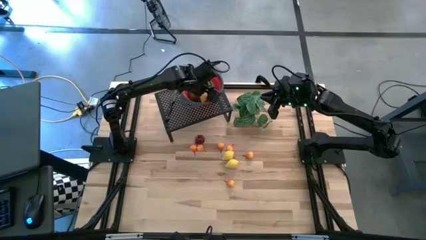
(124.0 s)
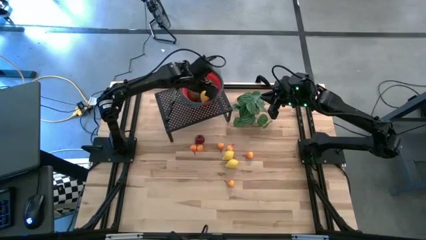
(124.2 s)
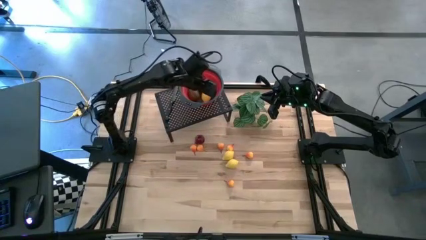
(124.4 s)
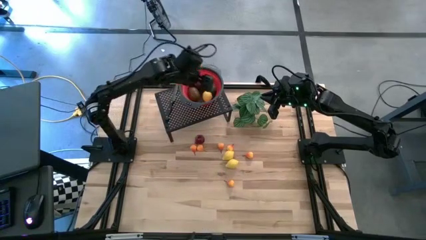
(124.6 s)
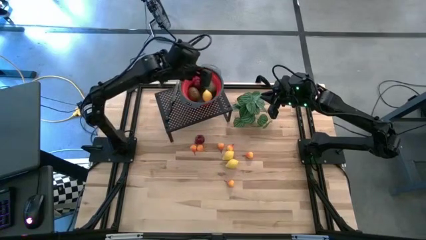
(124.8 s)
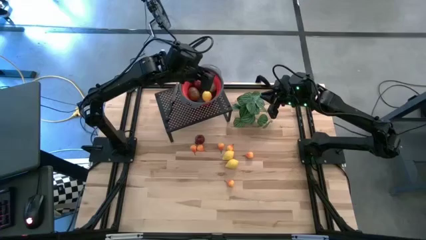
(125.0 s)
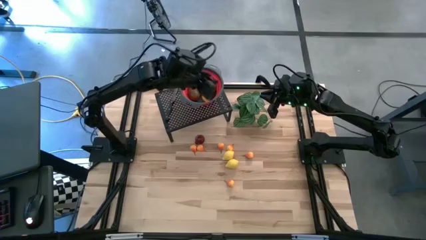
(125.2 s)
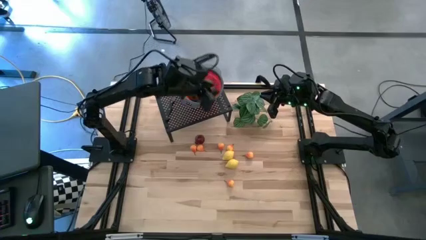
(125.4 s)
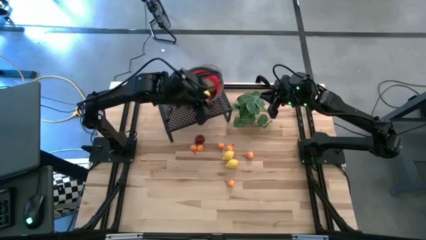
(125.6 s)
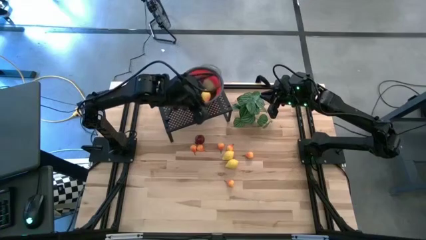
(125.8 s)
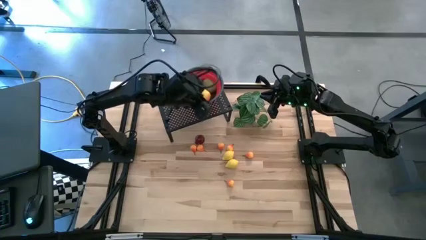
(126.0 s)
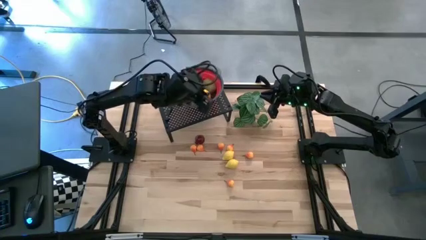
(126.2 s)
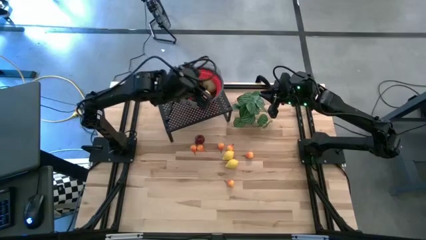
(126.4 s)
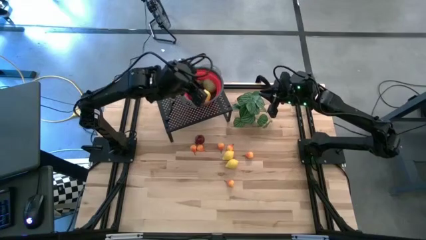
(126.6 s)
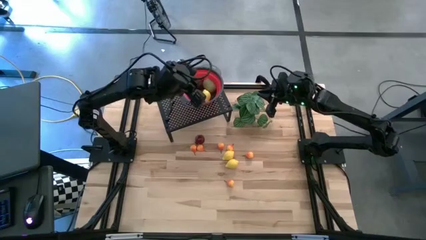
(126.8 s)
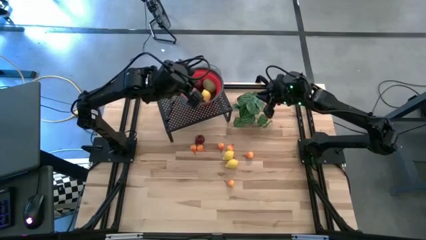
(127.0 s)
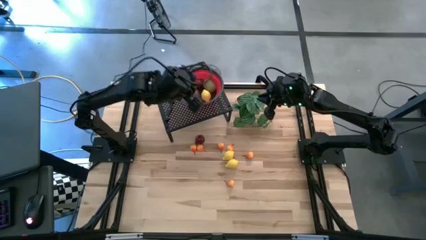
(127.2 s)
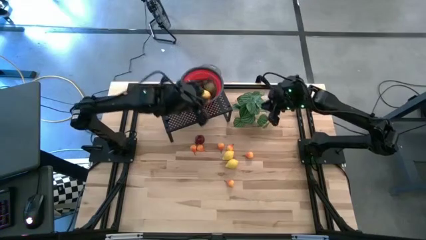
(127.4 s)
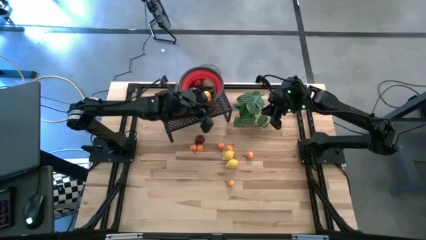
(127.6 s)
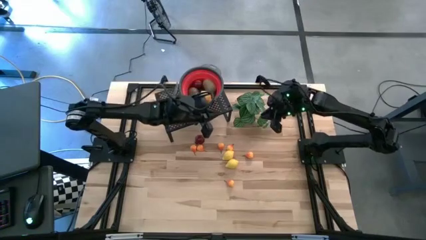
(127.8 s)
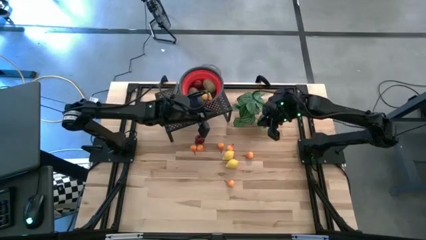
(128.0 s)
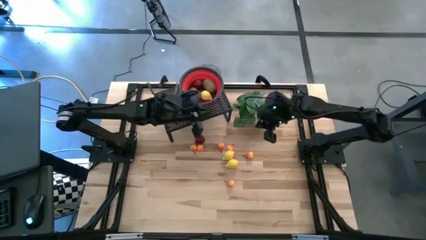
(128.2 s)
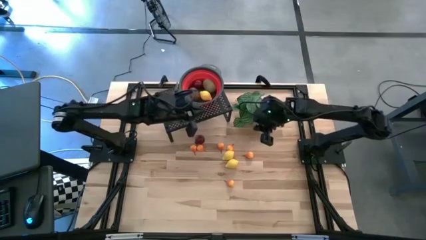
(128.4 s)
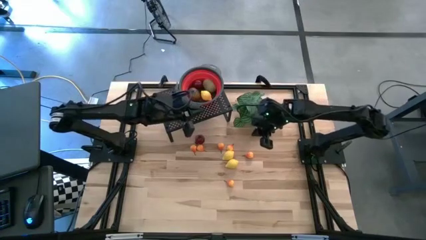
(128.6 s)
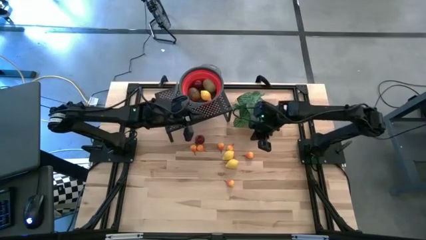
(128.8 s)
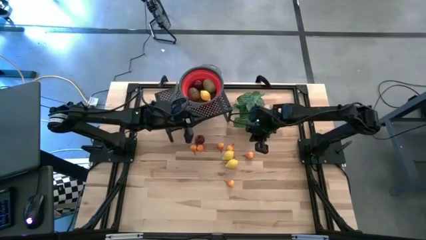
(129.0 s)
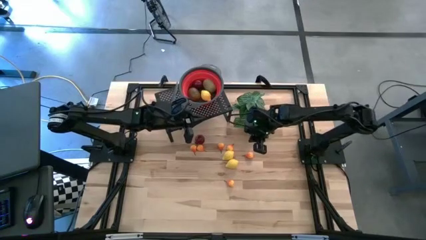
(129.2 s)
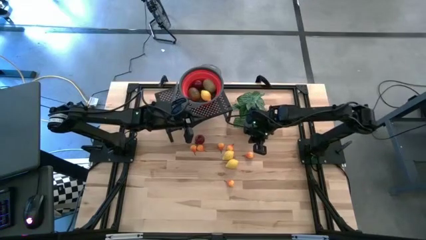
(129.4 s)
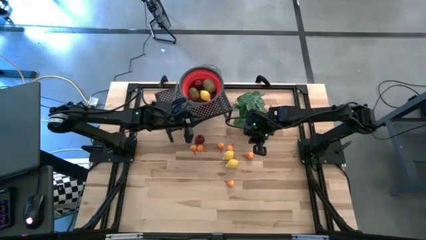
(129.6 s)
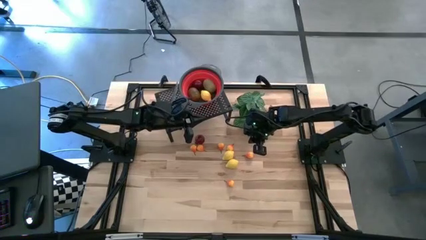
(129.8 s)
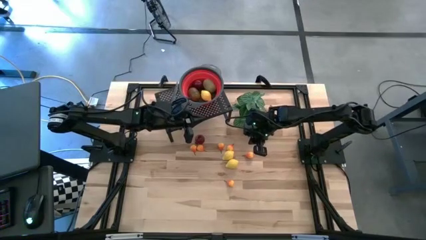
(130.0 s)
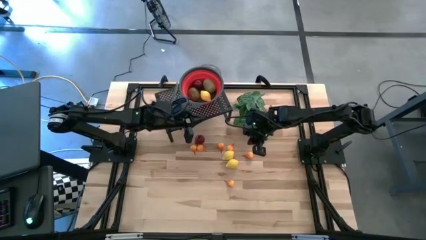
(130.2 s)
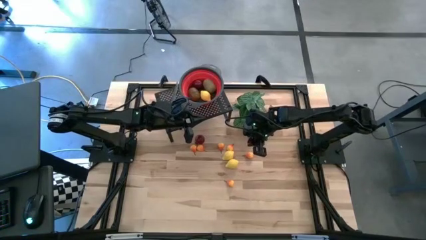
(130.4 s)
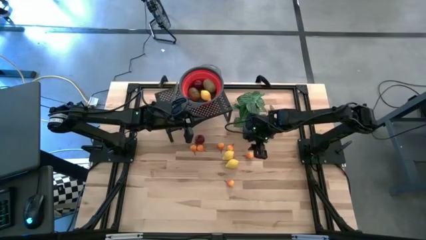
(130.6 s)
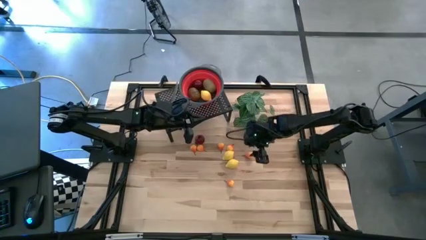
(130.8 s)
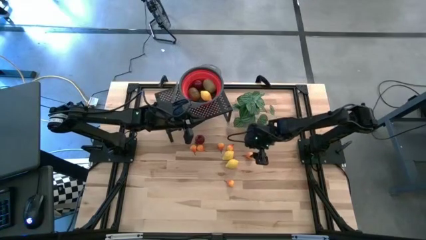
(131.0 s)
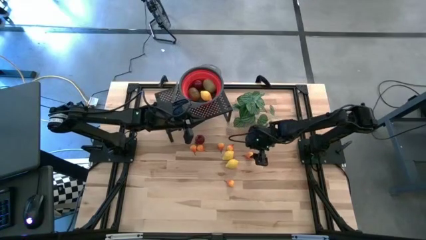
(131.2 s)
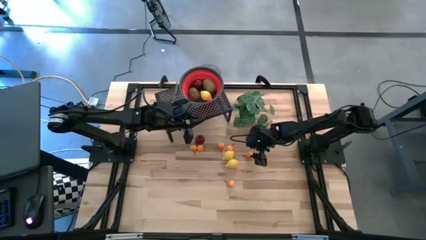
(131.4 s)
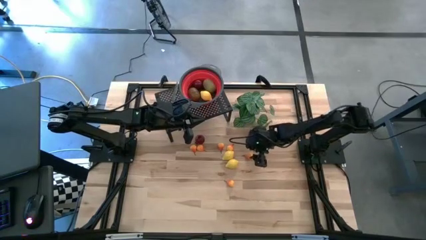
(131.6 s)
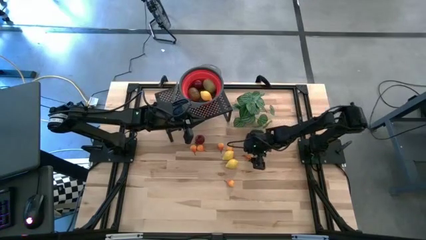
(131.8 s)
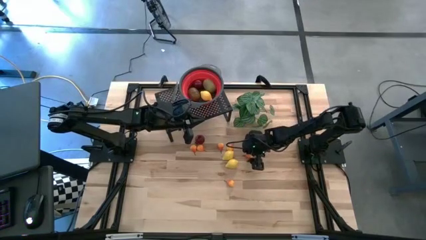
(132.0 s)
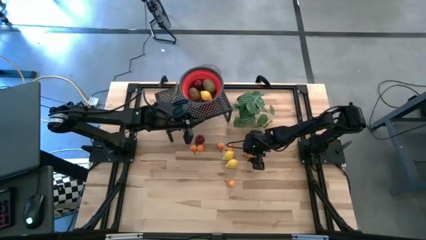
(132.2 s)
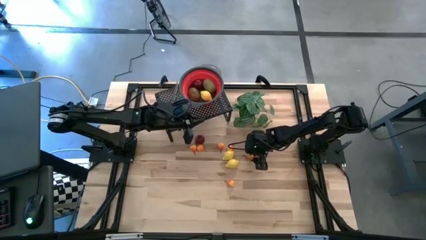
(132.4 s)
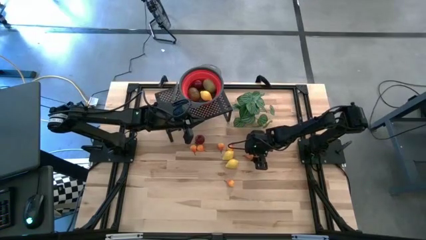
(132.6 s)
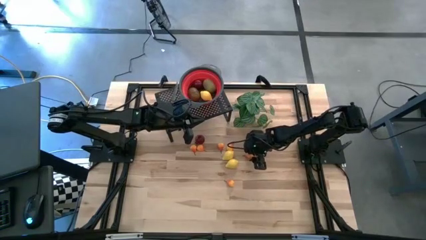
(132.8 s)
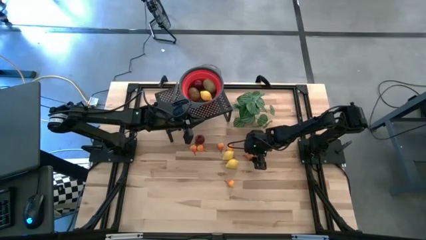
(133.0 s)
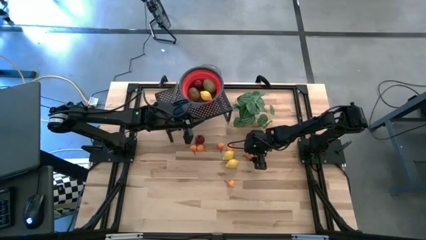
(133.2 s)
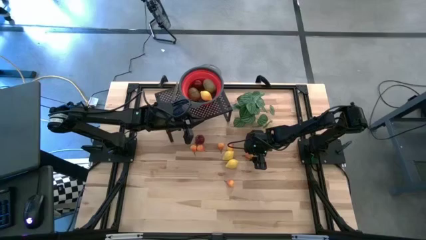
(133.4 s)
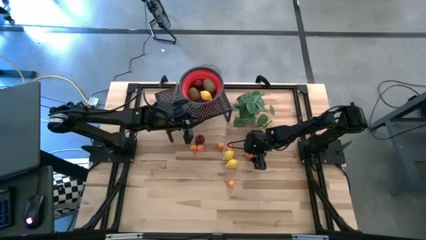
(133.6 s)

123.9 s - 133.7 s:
Task: Pick & Place Fruit
Put the orange pear into the red basket on the shelf

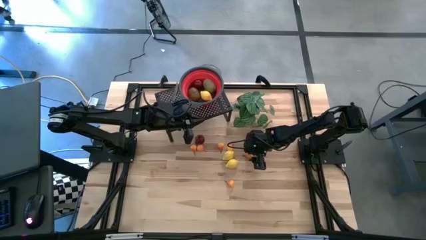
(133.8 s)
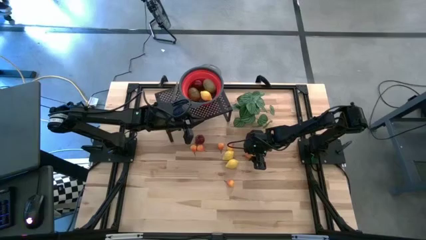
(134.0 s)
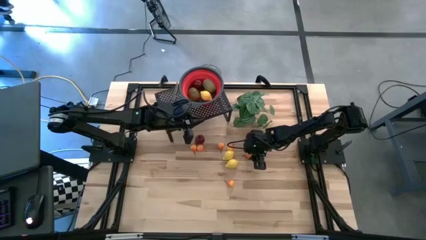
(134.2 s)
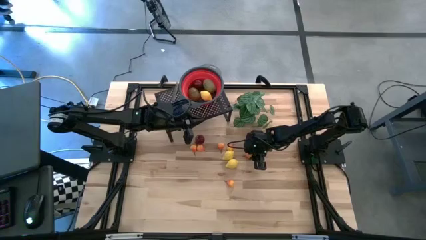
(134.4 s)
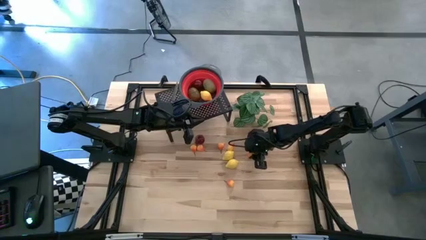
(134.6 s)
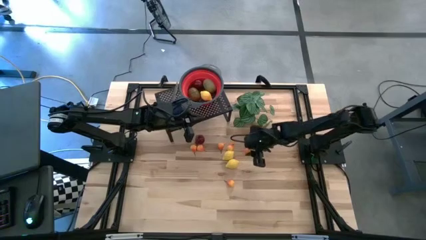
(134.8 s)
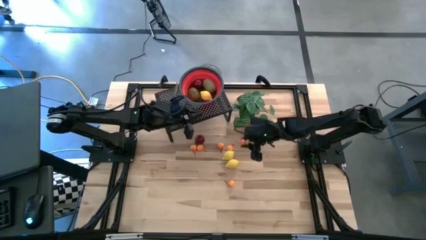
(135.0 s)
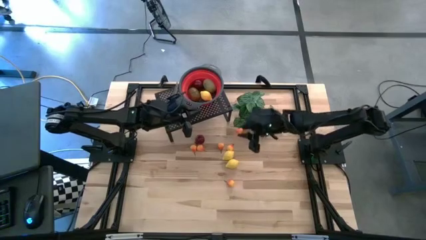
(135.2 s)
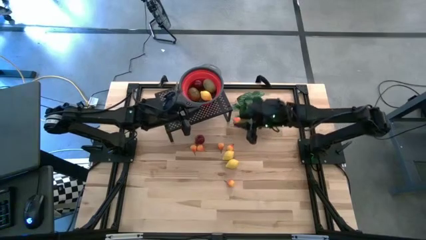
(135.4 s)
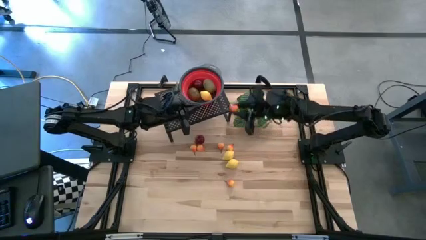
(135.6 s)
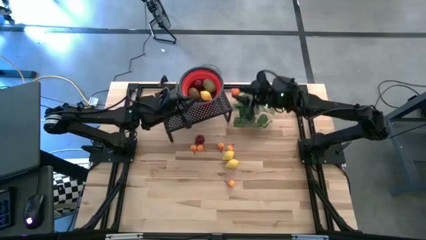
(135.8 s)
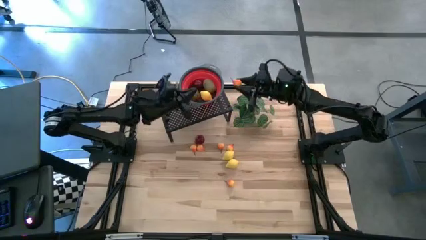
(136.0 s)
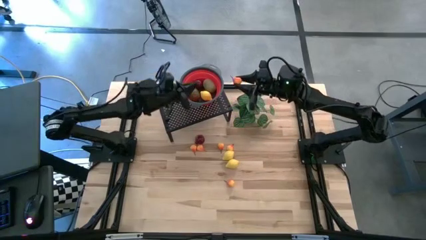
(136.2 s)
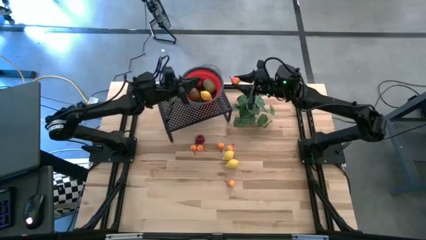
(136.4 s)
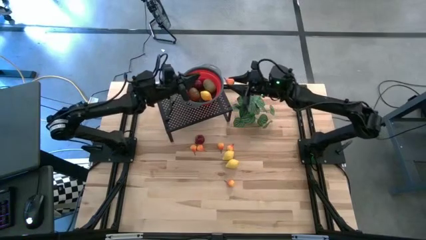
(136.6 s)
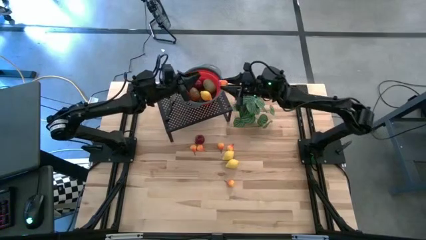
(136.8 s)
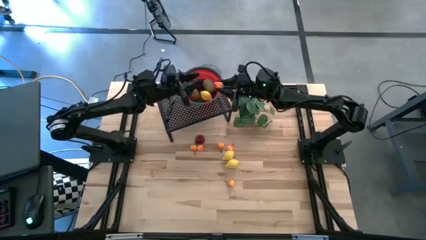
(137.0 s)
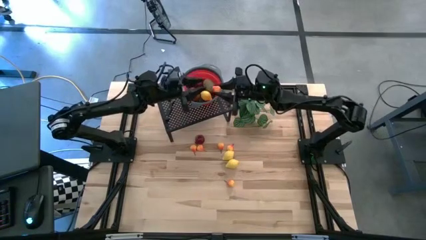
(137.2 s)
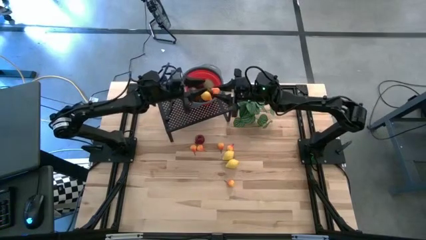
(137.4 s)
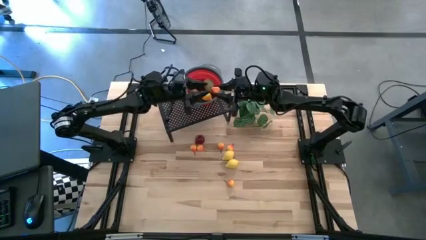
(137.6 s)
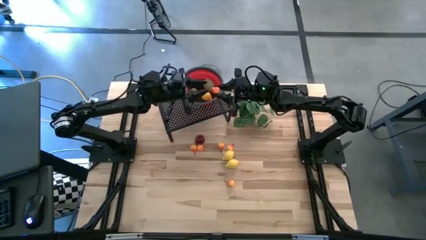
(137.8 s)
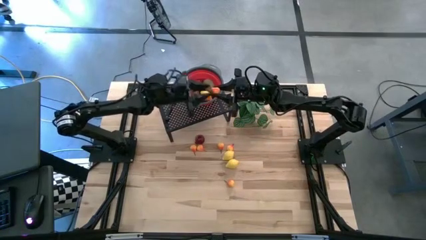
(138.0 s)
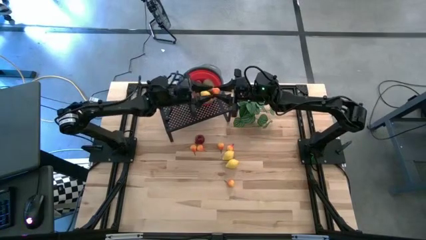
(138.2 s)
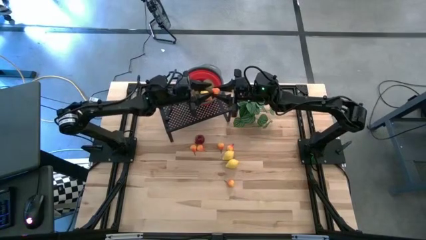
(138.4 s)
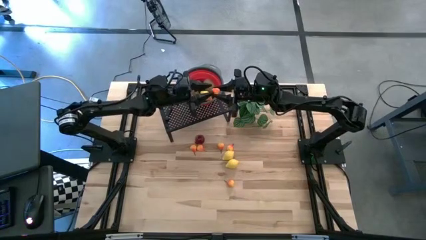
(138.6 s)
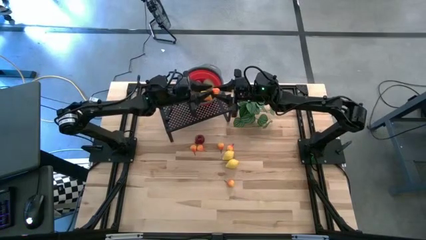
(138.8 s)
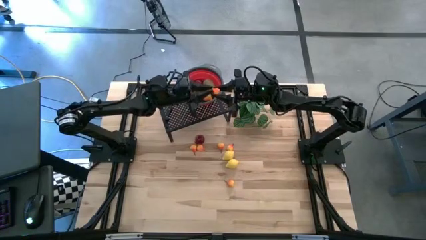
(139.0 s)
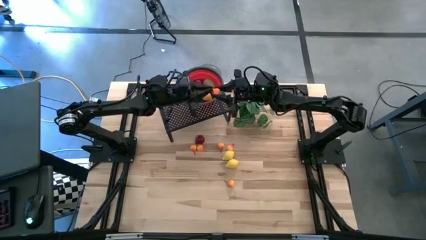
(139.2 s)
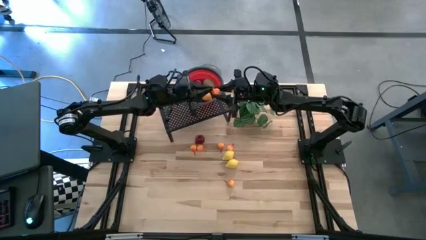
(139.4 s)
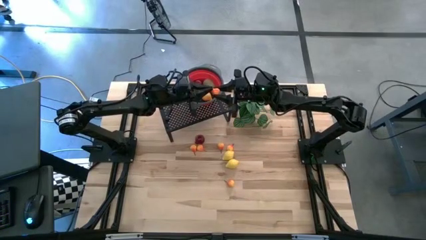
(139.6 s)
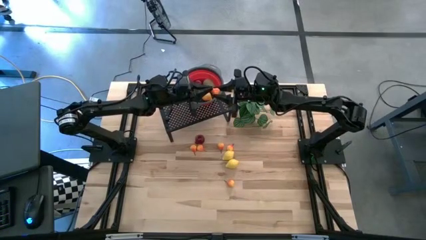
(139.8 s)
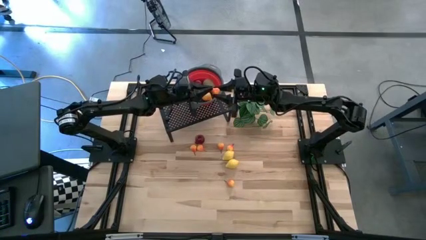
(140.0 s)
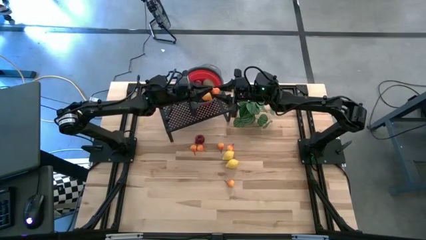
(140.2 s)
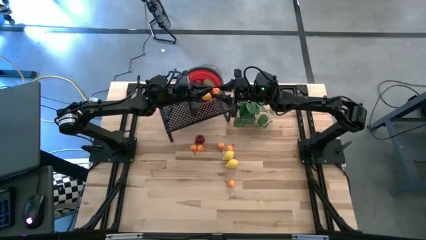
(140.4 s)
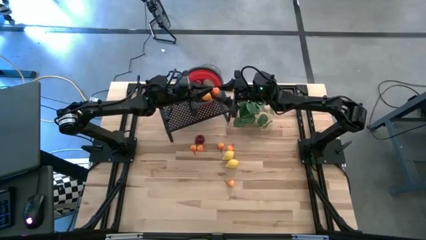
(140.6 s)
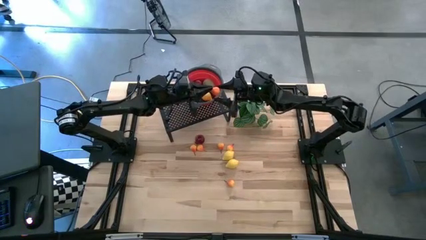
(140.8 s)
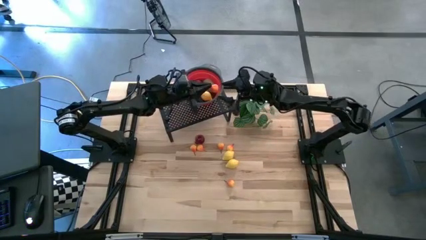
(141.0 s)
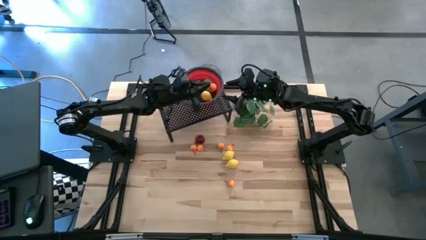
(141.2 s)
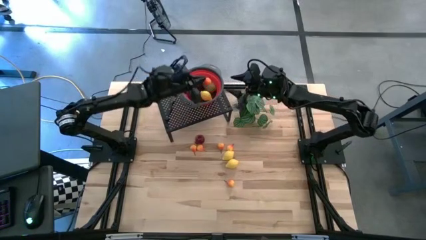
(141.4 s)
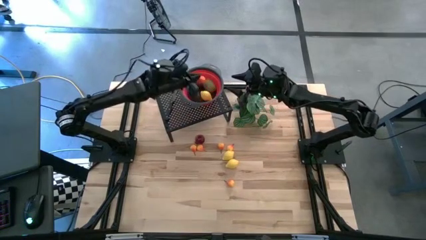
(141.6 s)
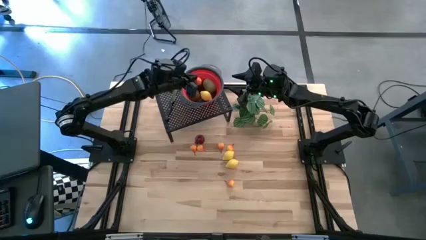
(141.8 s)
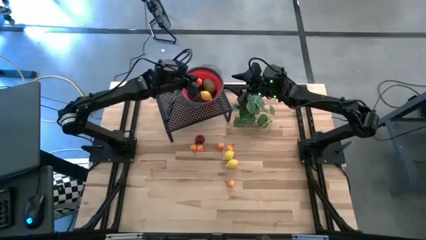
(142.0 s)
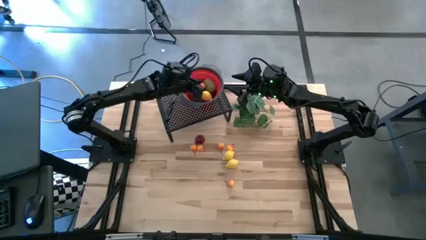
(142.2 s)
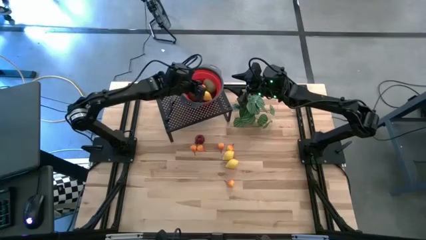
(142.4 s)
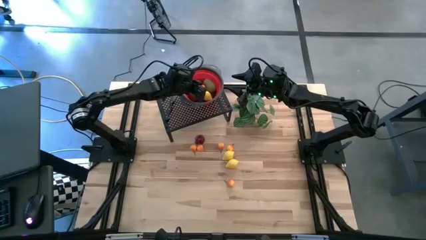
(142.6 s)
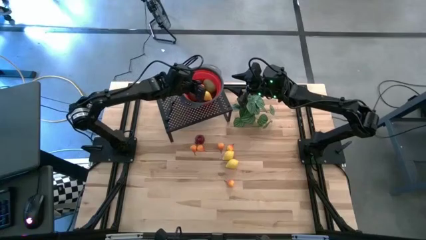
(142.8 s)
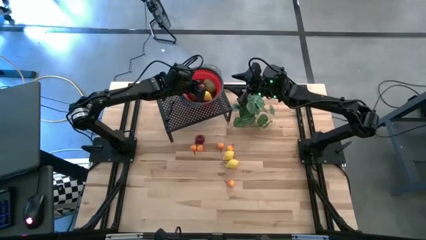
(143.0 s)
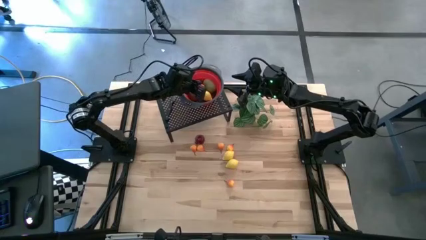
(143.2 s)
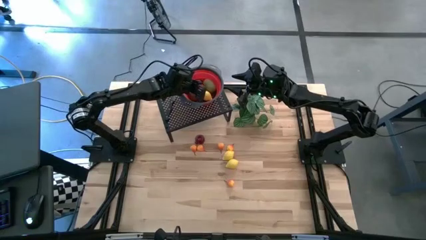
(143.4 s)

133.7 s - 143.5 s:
Put the orange pear into the red basket on the shelf
